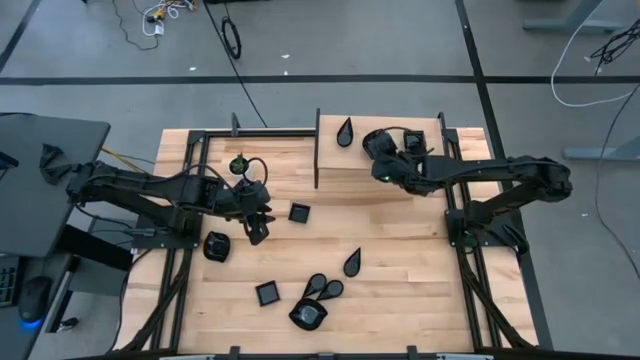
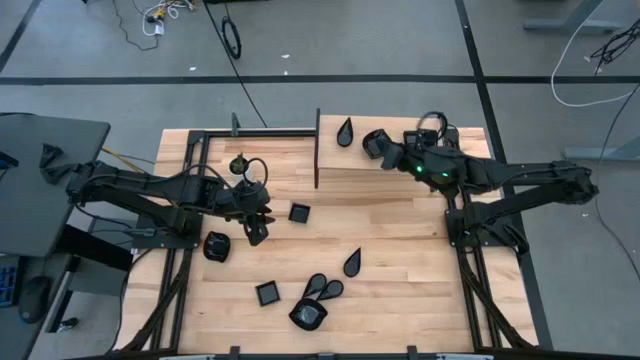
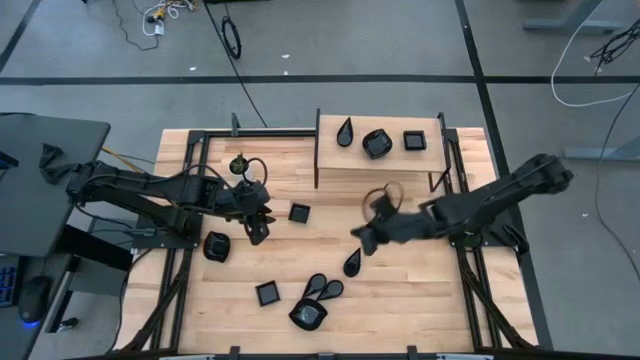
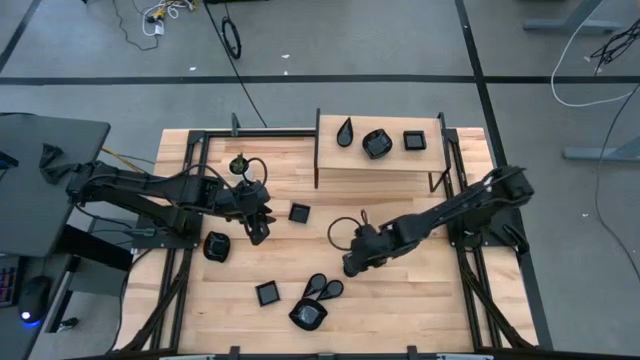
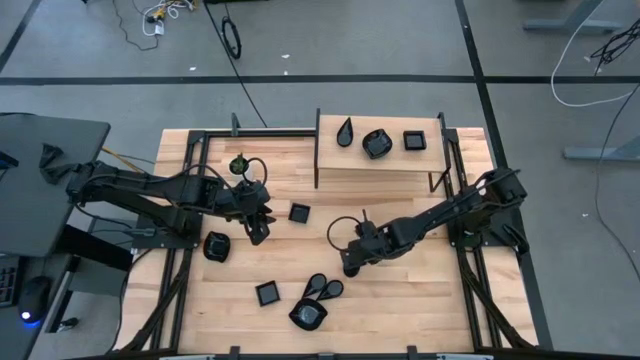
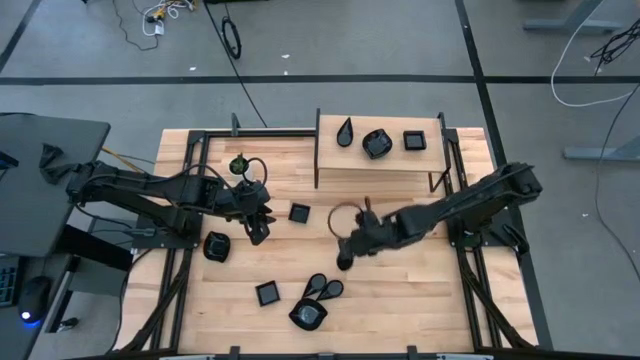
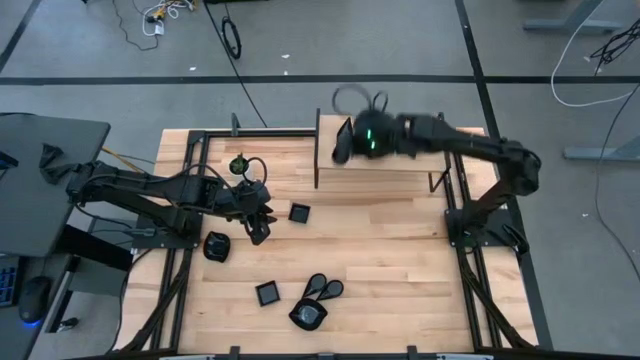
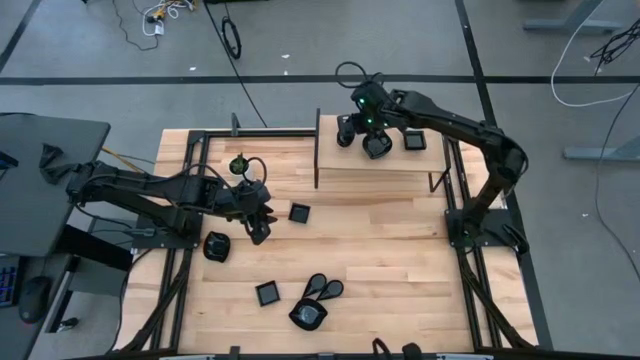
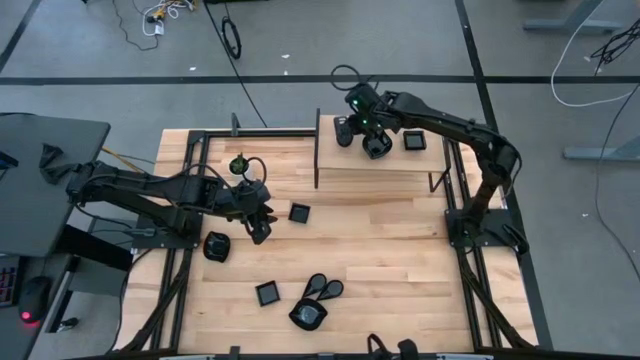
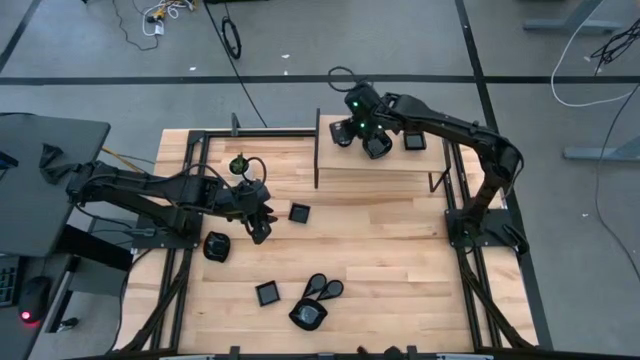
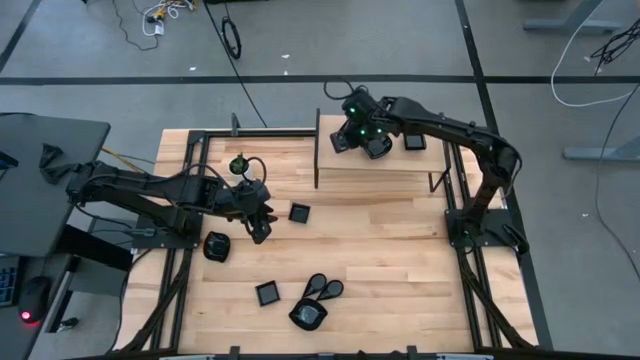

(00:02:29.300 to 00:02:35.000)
Task: Pick & Place Mini shaped plates
Stack the drop-shaped plate on top of the drop-shaped plate on the shelf

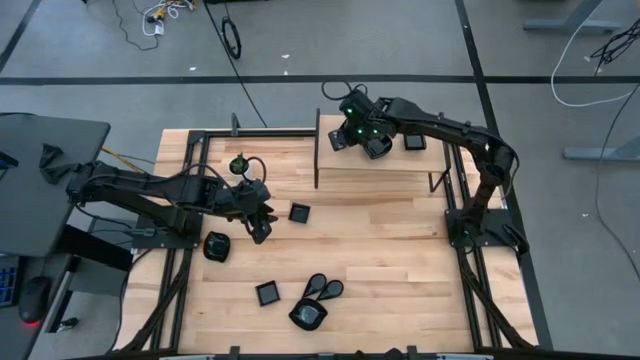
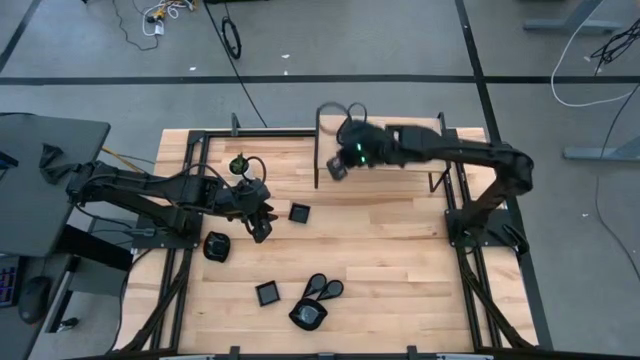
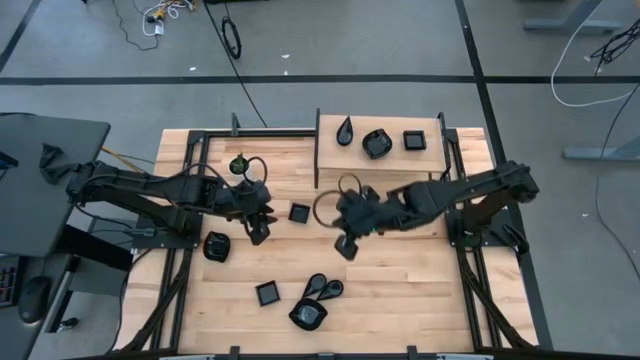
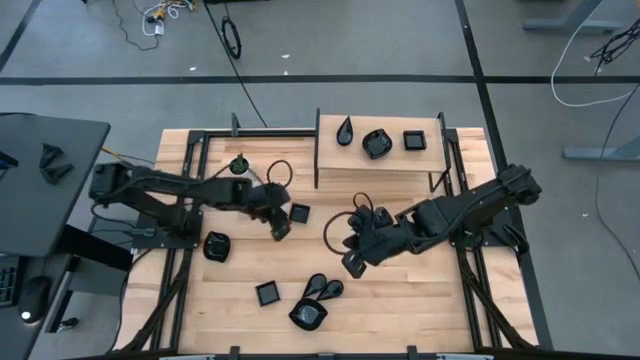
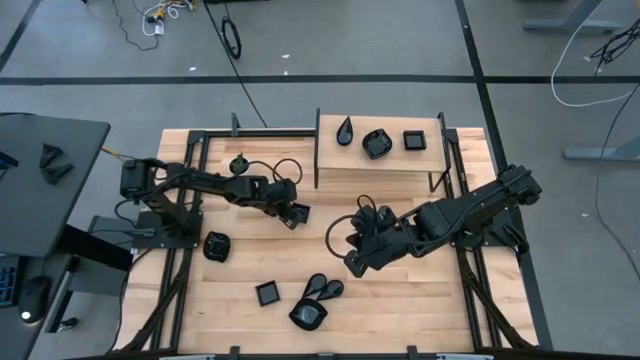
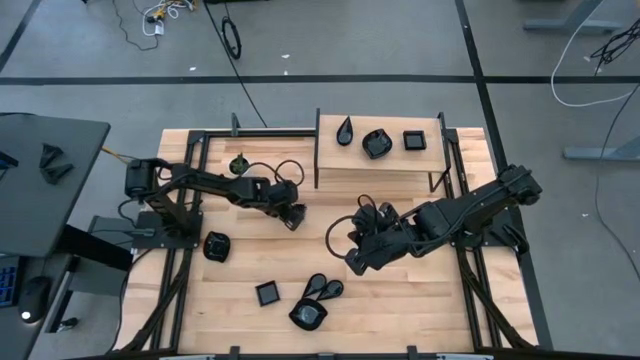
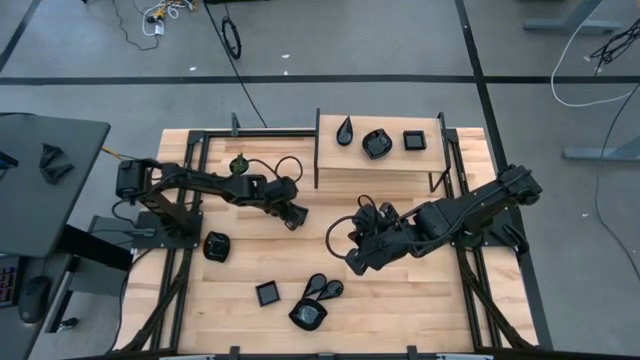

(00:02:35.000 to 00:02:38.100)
Stack the square plate on top of the square plate on the shelf

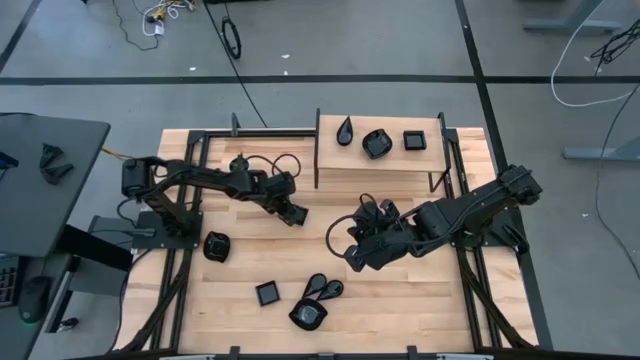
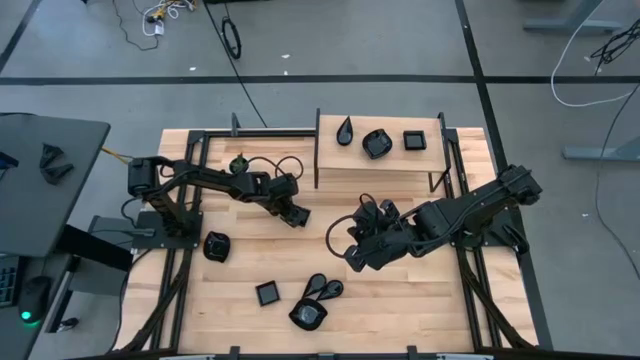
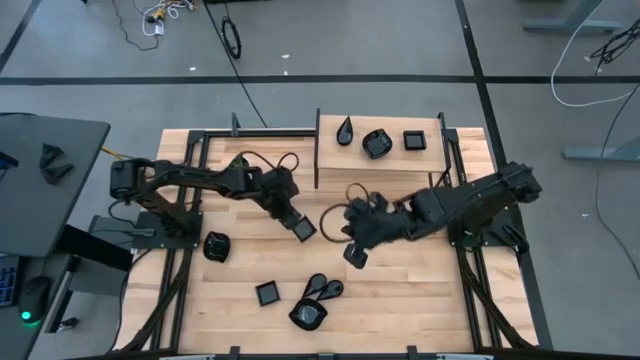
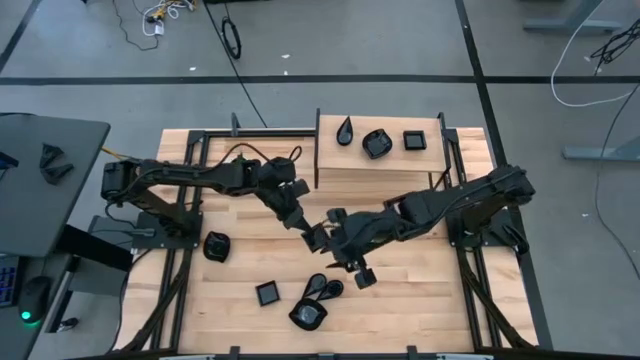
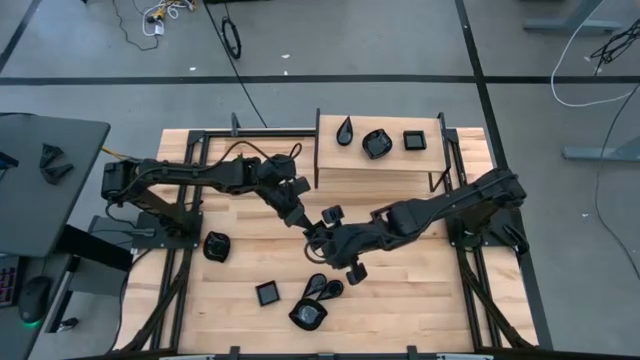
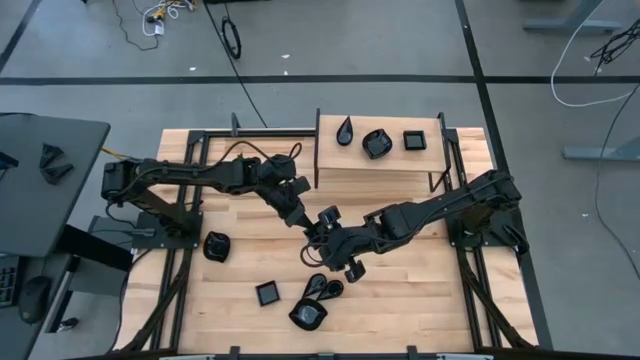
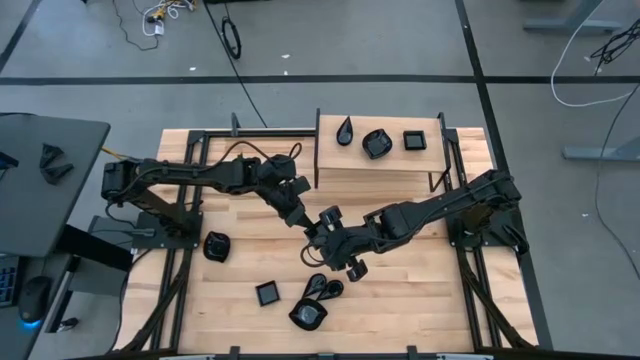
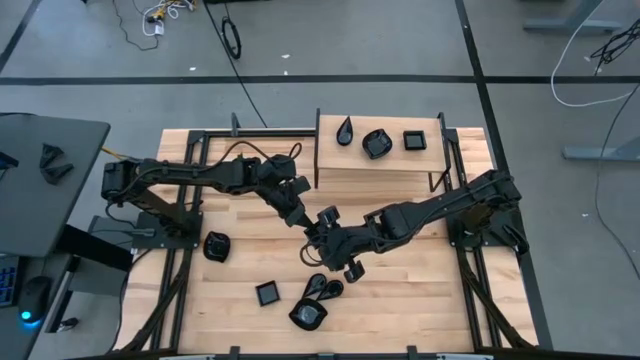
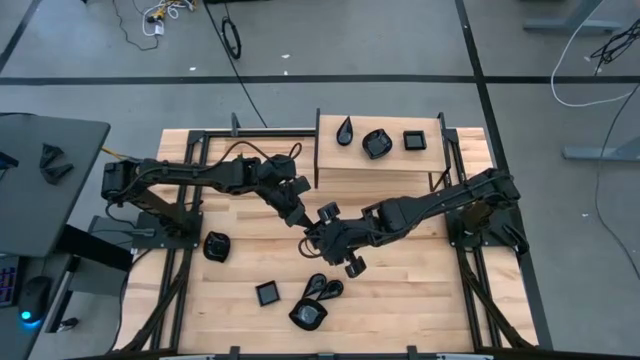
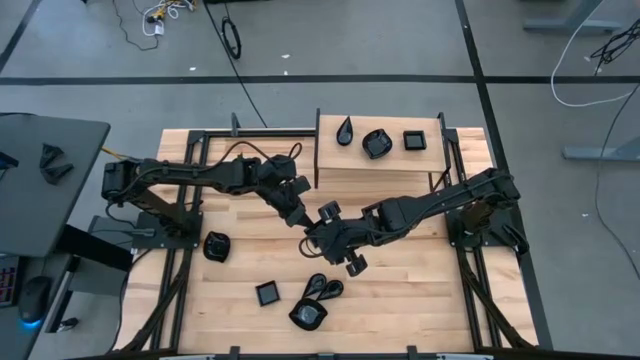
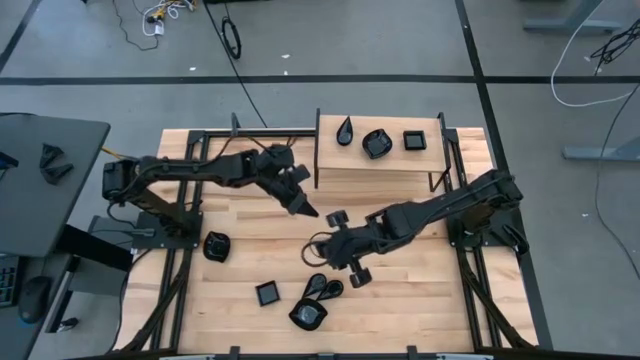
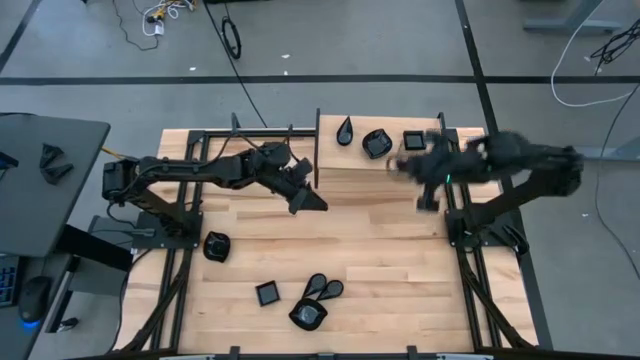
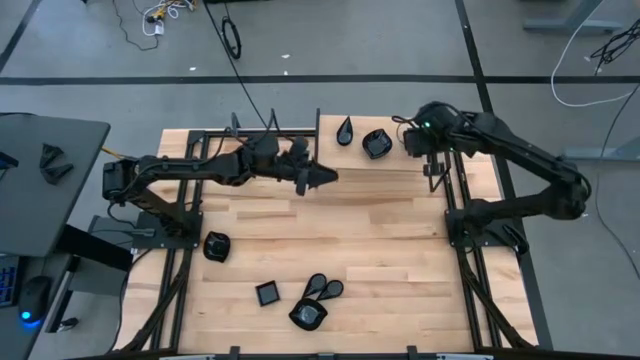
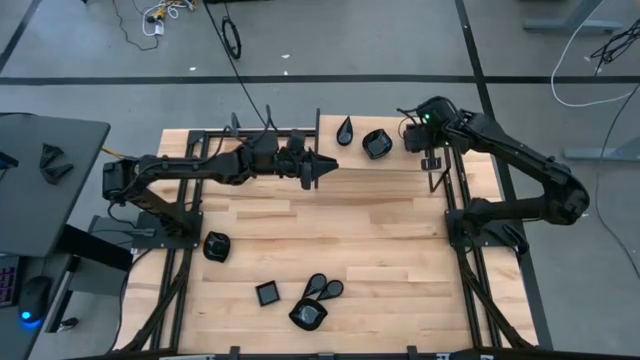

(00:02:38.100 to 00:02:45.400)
Stack the square plate on top of the square plate on the shelf

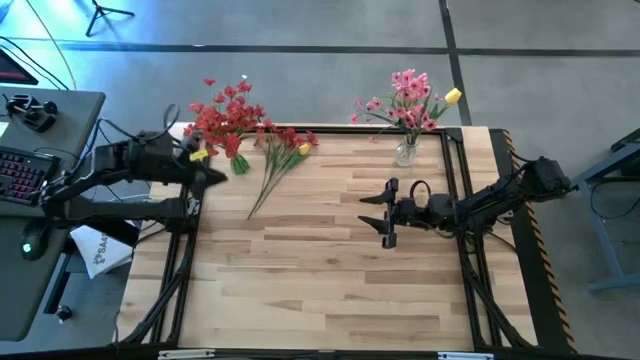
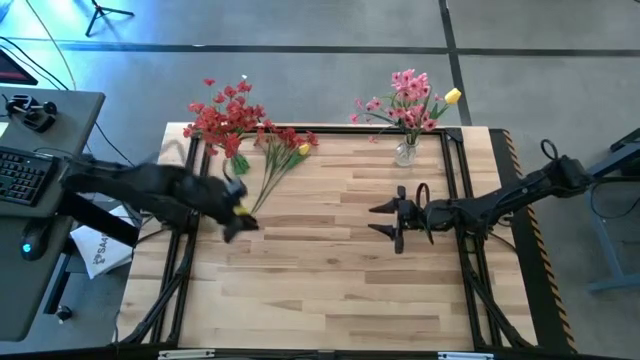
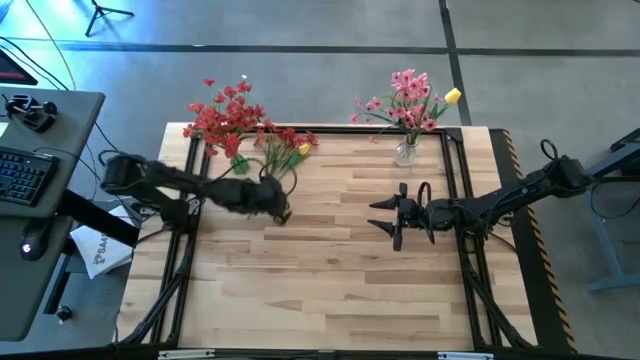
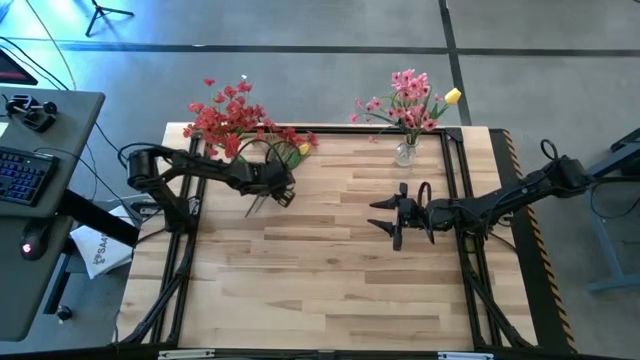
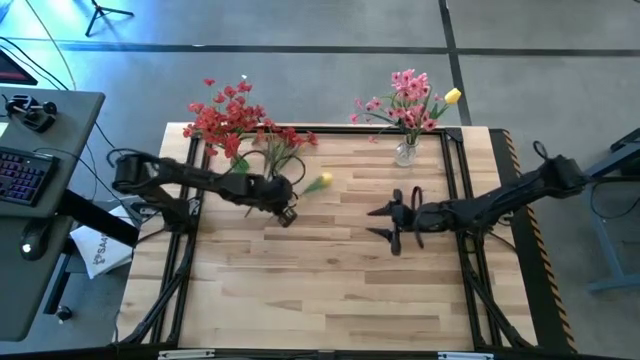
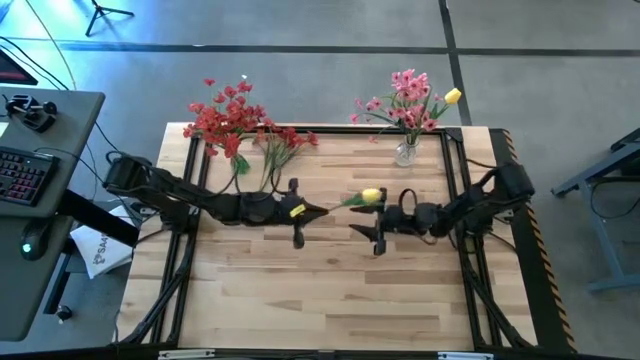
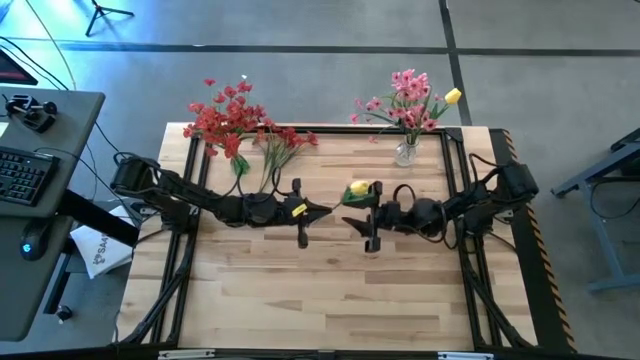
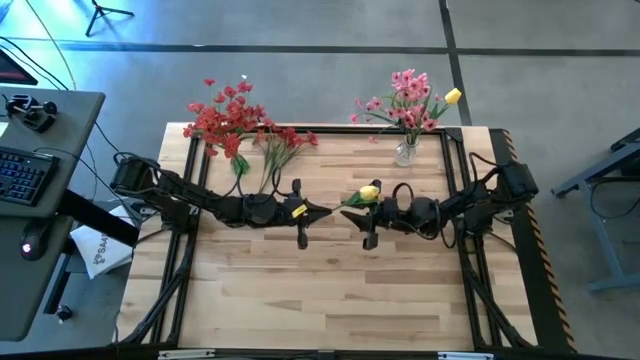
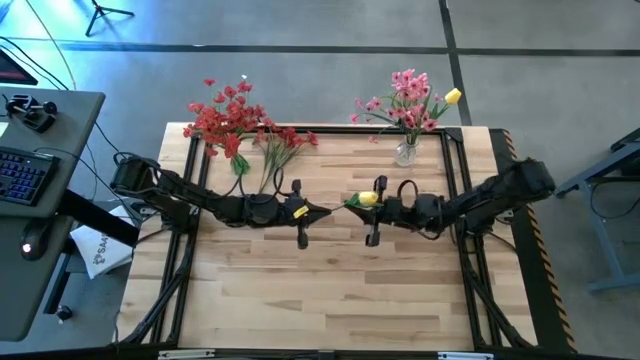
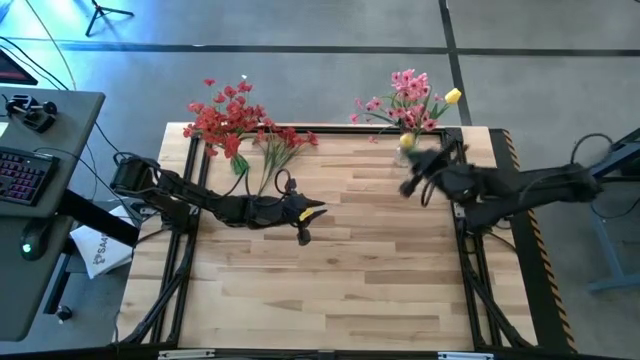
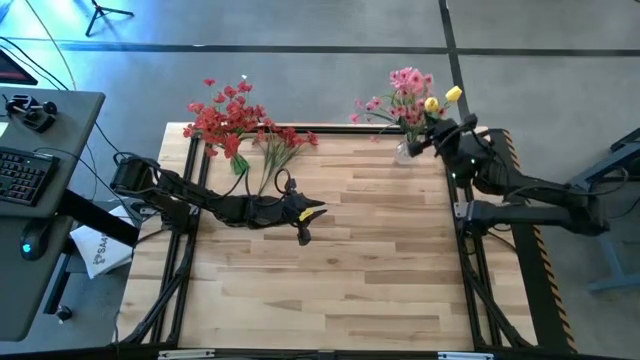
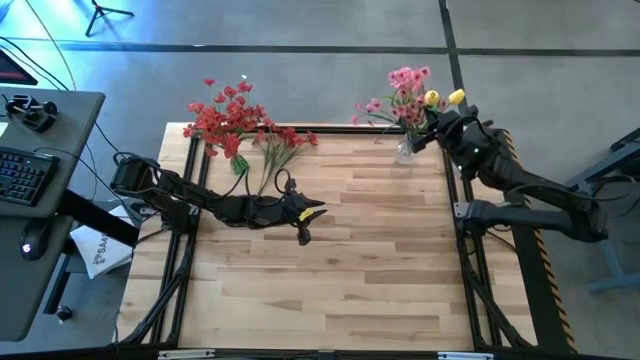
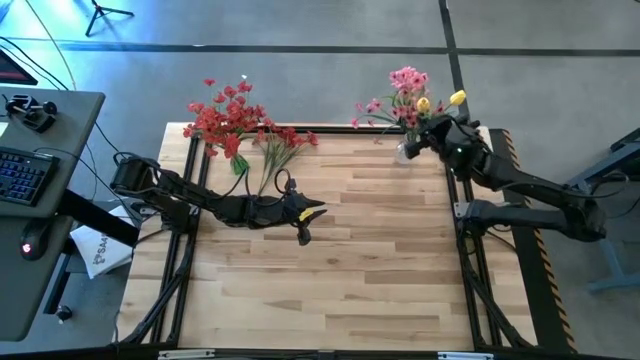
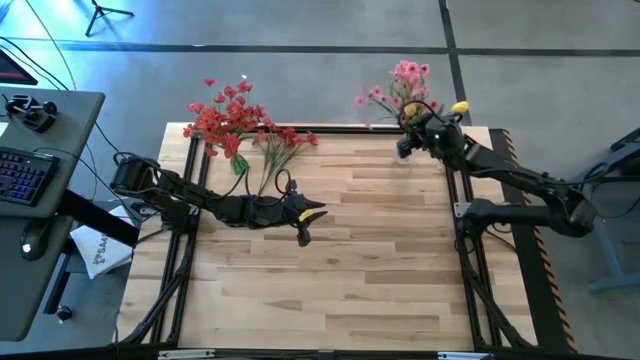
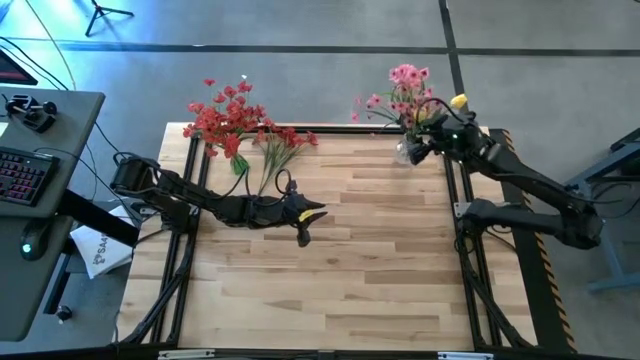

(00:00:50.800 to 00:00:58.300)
Task: Sort flowers into vase by color
Put the yellow tulip into the transparent vase
